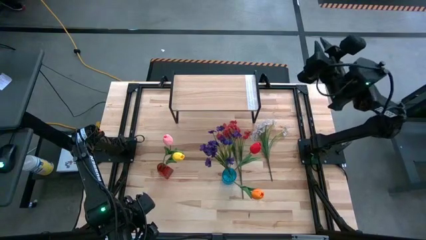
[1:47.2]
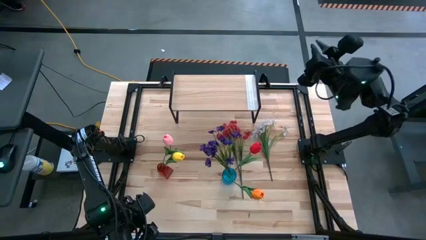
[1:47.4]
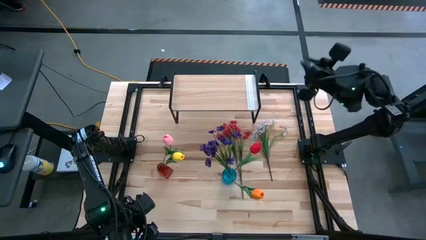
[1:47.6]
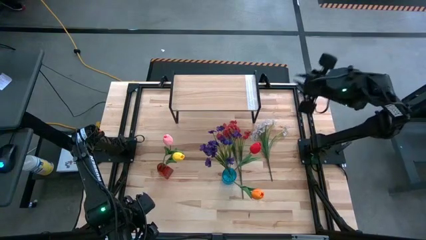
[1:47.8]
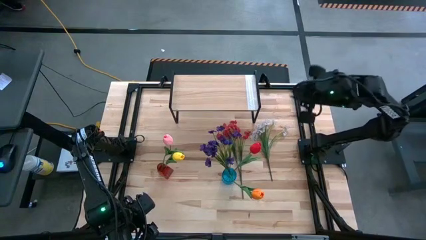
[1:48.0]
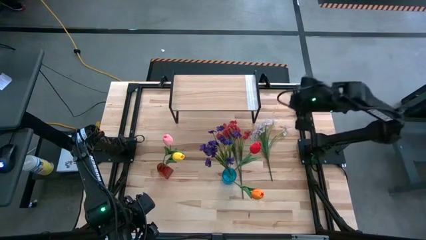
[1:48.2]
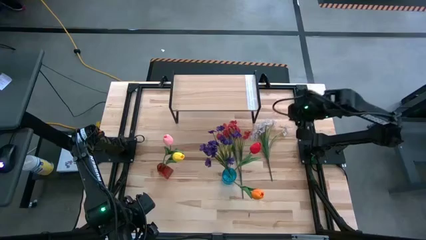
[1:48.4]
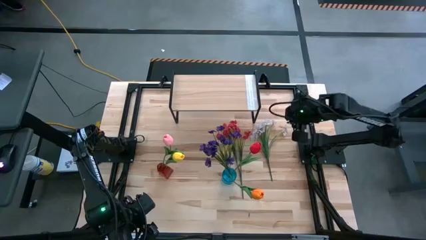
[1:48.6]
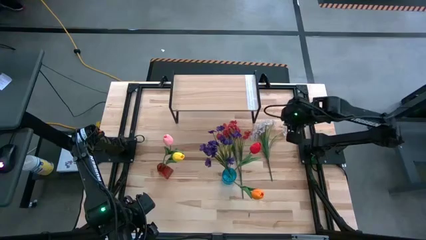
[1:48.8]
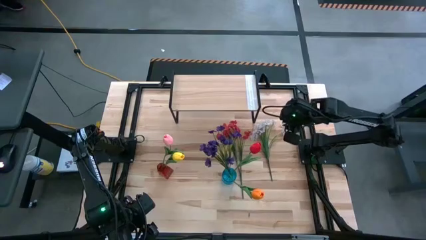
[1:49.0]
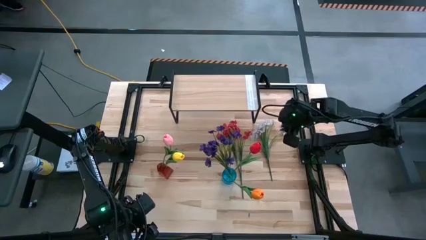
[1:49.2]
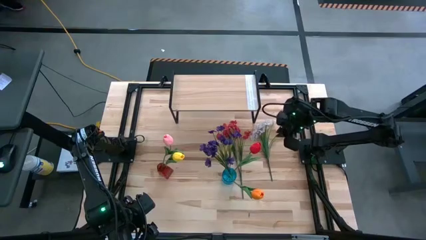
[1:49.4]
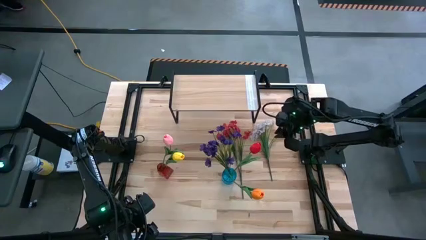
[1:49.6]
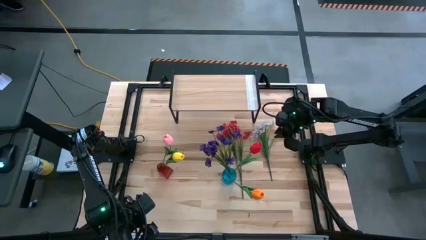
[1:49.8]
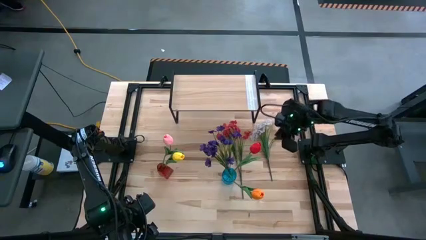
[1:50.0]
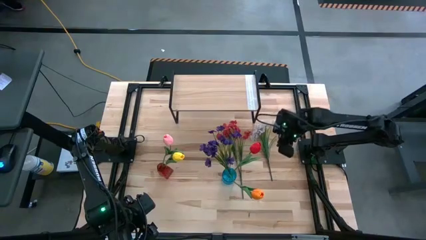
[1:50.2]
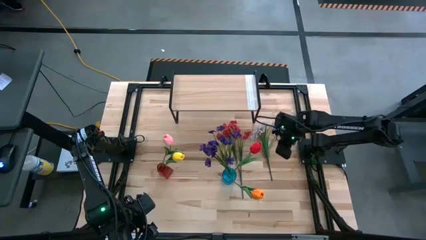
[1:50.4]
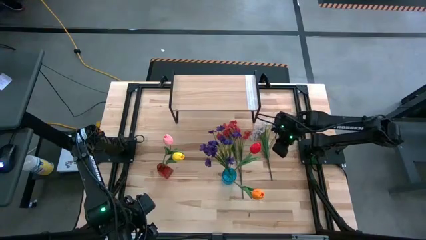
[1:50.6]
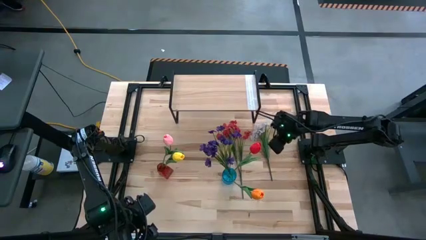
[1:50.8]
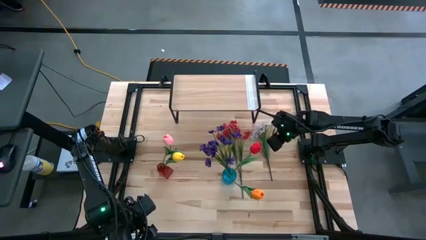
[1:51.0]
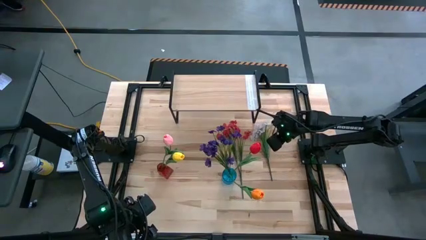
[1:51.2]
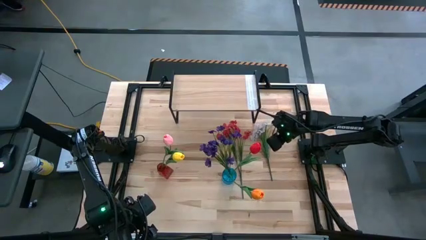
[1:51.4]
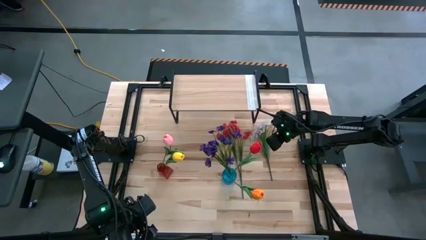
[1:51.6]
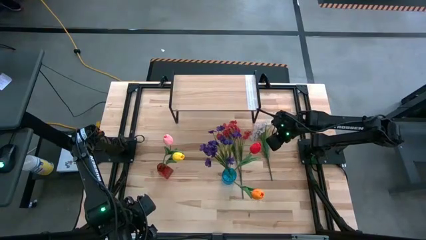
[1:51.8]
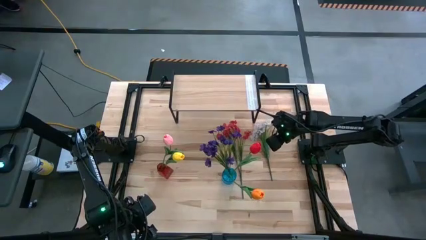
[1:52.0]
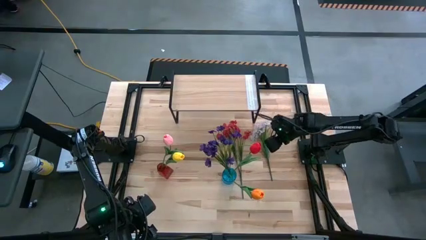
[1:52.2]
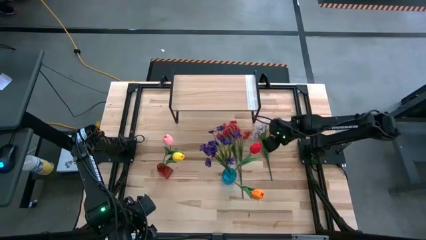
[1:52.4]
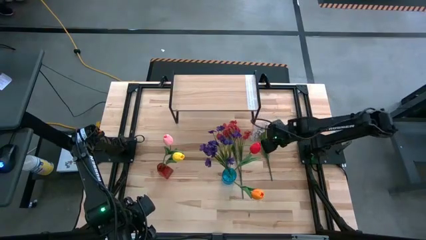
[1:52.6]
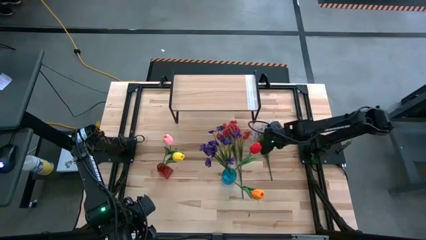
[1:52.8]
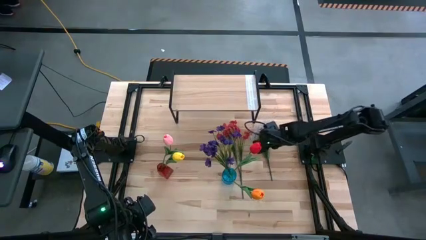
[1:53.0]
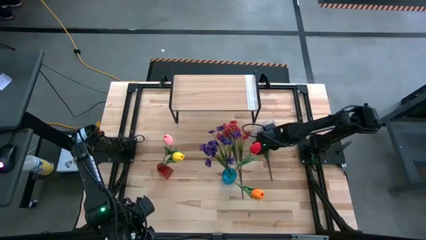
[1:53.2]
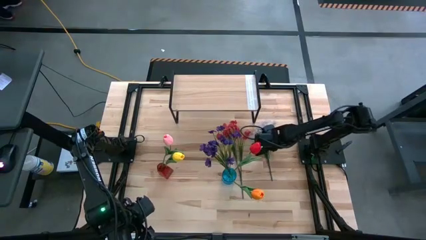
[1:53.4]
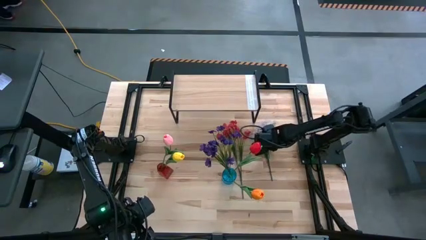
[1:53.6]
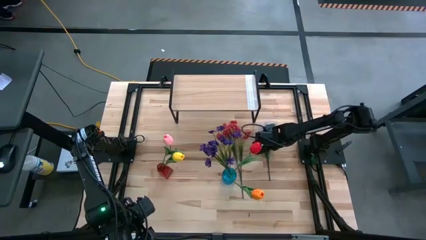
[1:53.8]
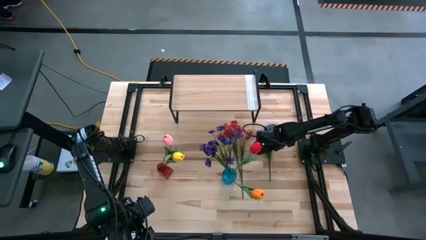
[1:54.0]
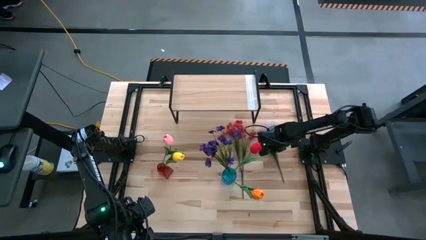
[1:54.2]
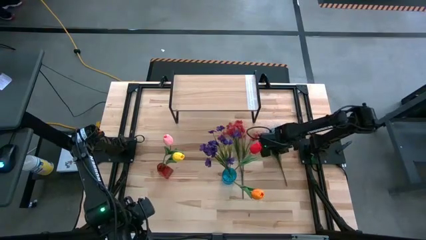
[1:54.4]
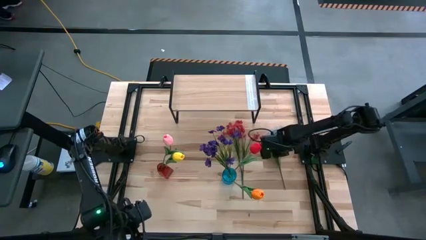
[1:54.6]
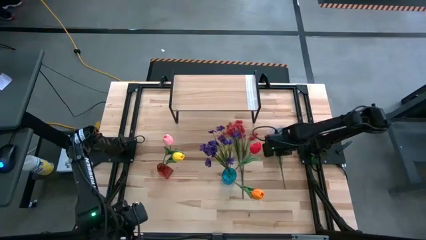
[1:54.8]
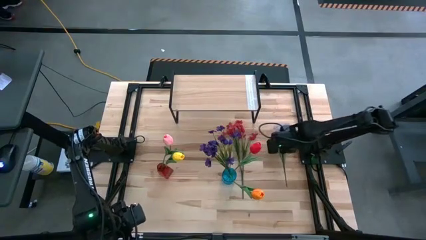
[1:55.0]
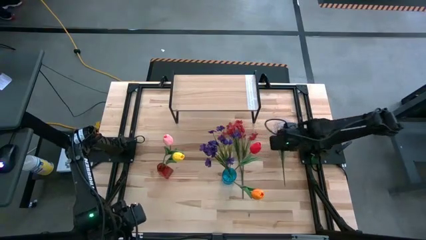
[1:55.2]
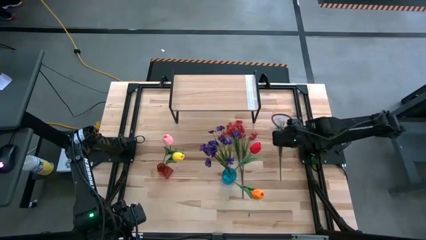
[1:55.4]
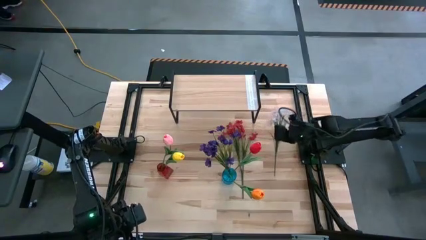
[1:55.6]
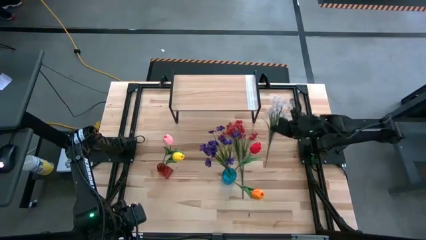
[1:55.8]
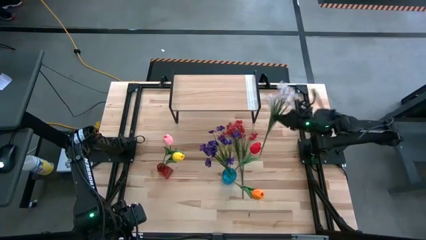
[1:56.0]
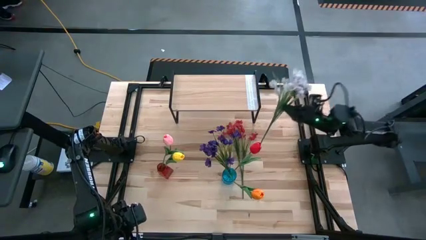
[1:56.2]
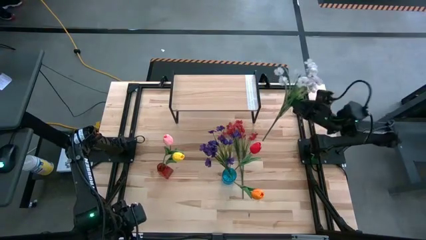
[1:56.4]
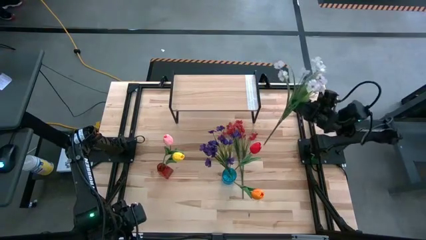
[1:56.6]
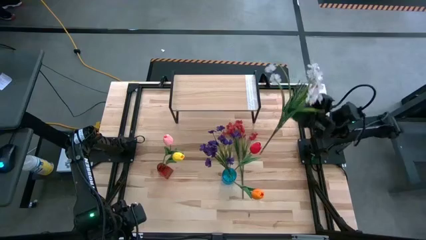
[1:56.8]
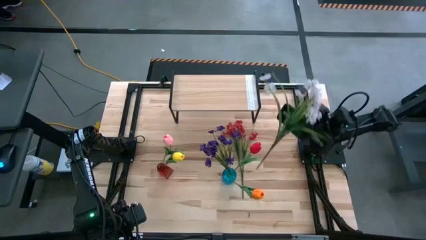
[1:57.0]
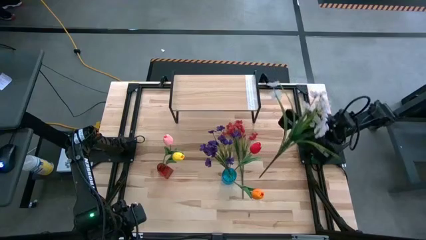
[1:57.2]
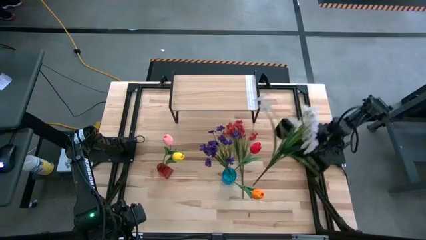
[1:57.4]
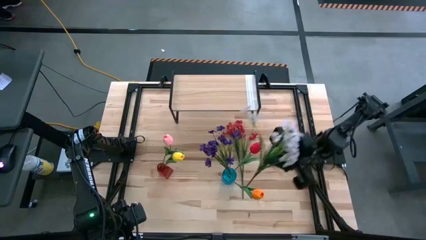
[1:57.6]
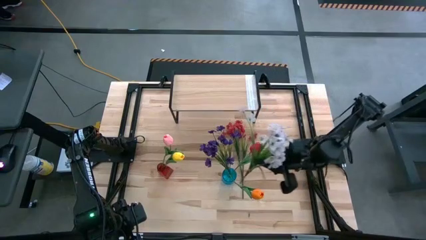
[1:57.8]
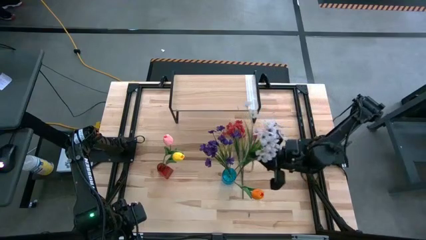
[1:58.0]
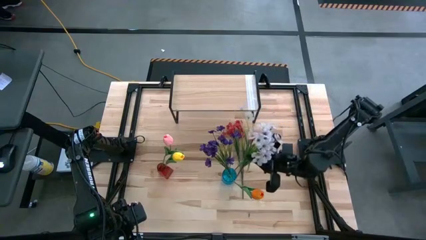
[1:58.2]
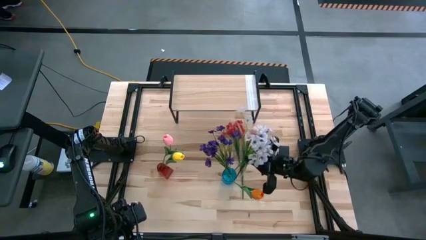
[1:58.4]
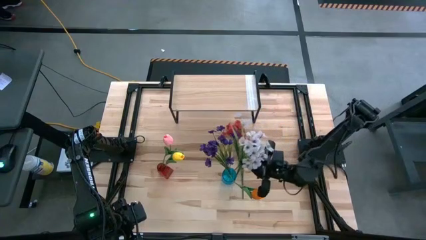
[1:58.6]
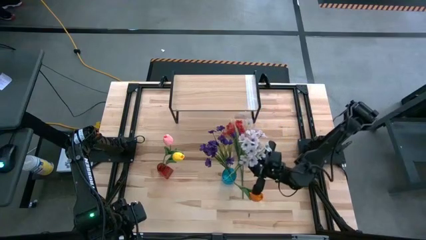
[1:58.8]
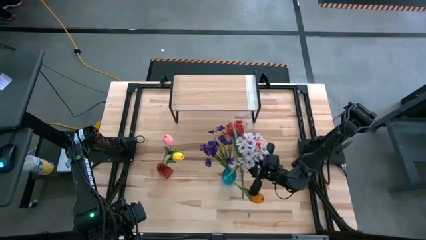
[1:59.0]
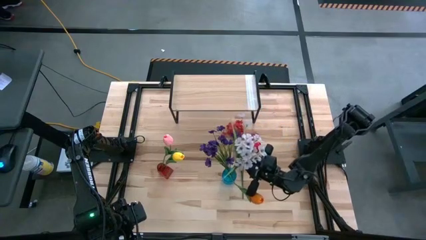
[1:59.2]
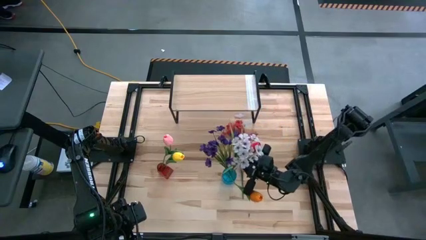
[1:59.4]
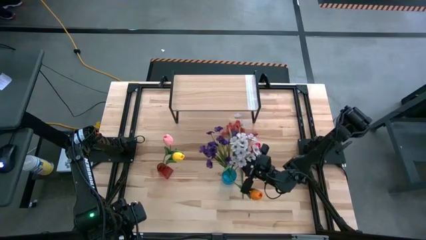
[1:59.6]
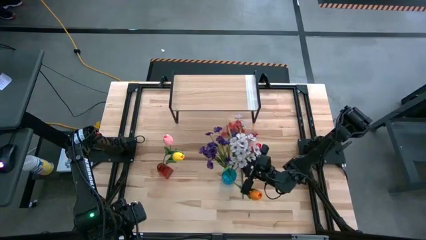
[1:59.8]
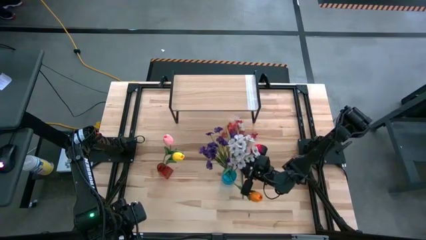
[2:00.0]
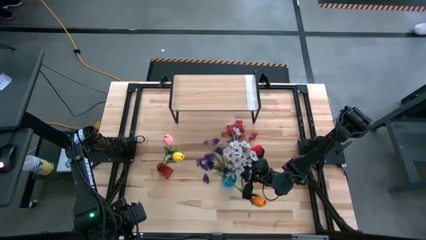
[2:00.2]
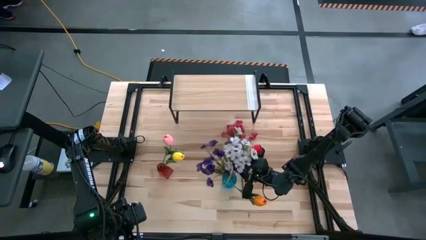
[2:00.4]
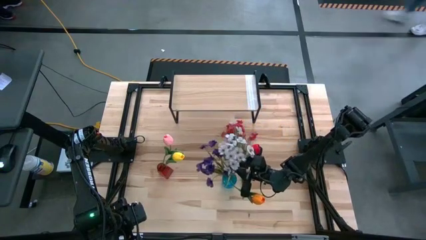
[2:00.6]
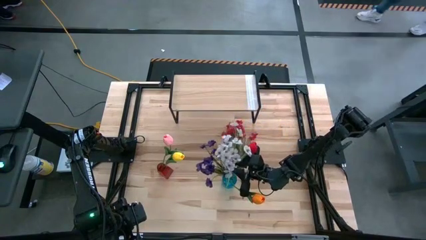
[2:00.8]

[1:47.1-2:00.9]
Task: Pick and place flowers into a vace then onto a shelf
Put the white flowers into the blue vase
